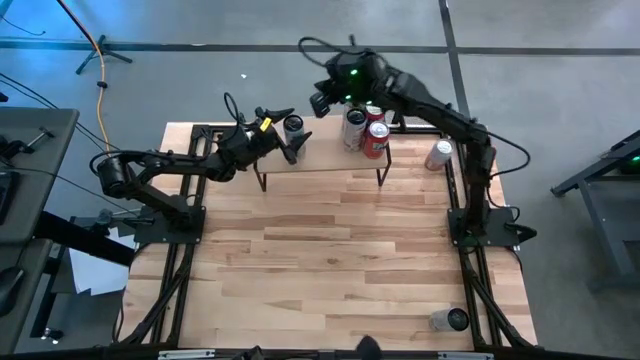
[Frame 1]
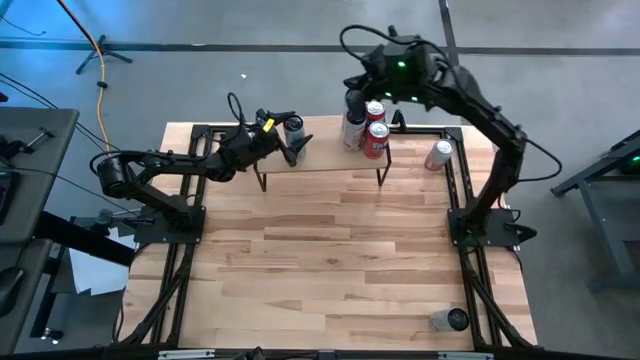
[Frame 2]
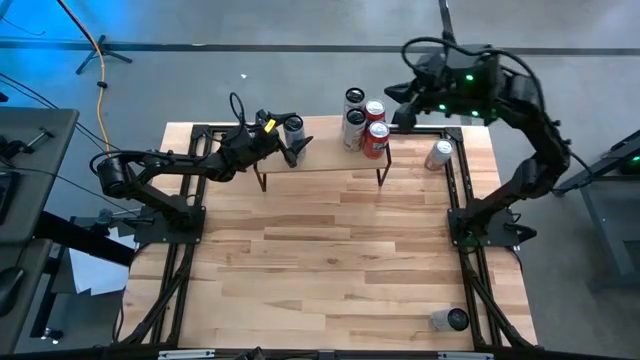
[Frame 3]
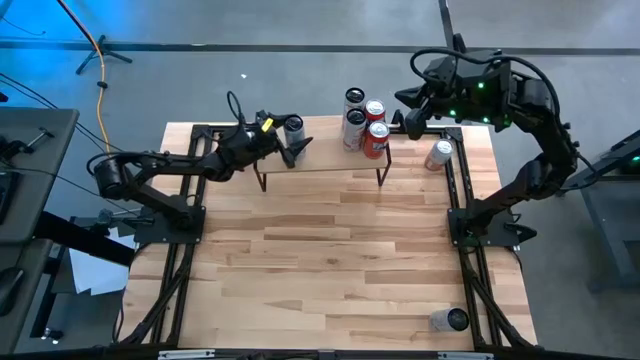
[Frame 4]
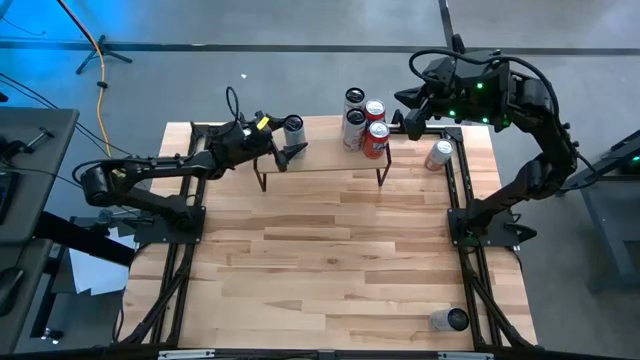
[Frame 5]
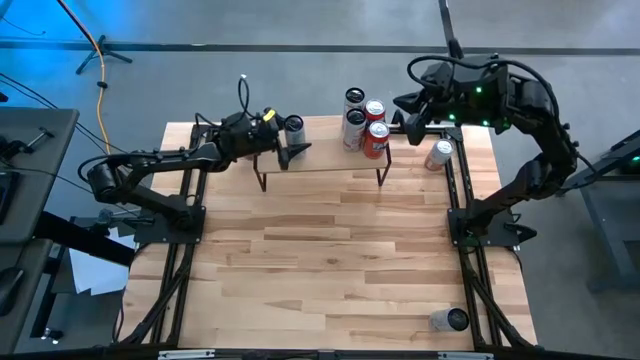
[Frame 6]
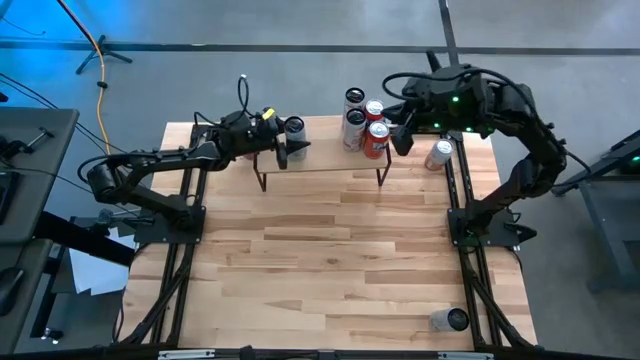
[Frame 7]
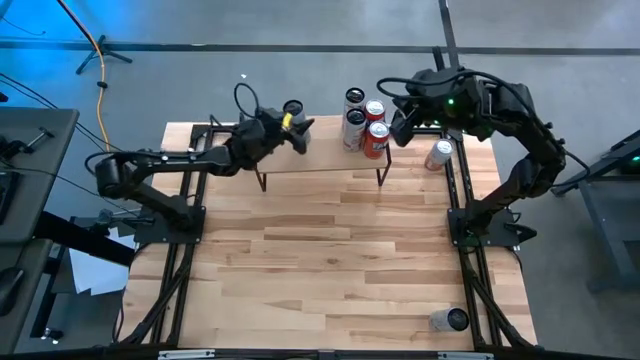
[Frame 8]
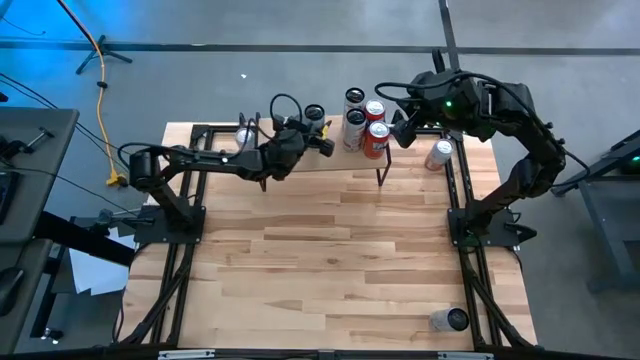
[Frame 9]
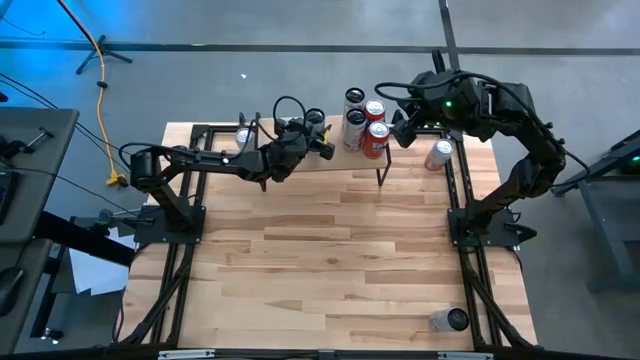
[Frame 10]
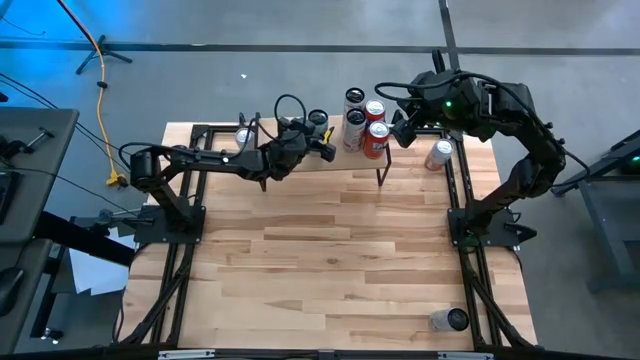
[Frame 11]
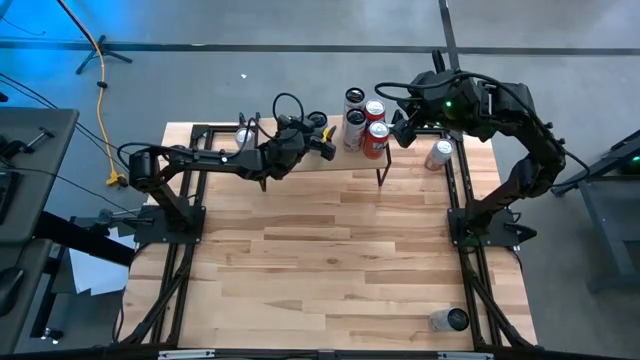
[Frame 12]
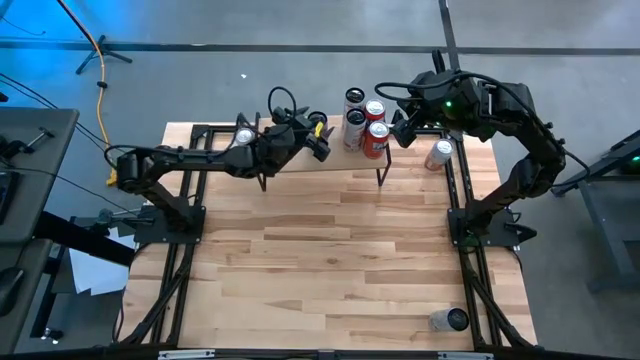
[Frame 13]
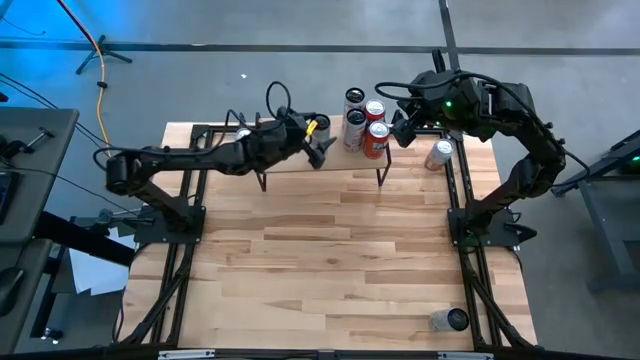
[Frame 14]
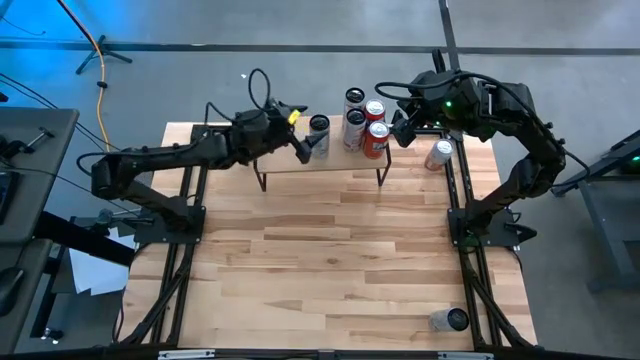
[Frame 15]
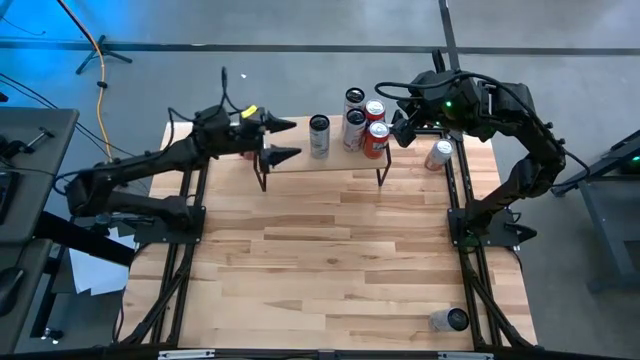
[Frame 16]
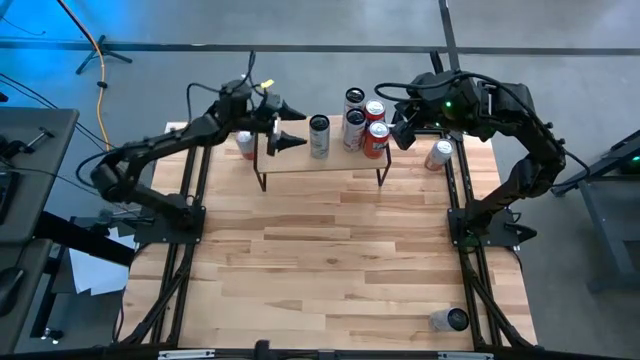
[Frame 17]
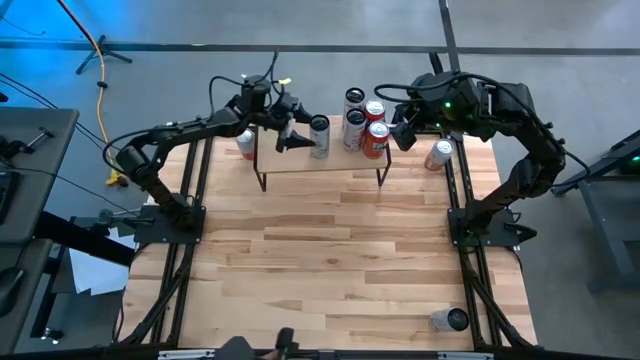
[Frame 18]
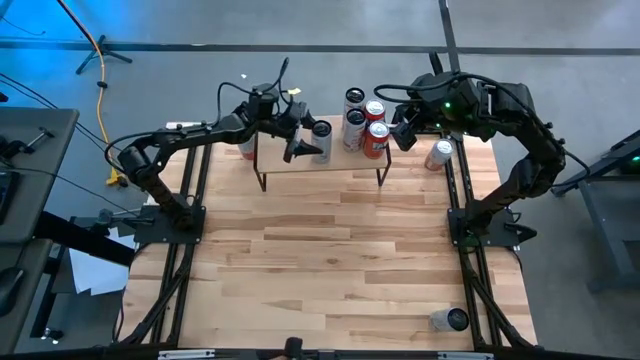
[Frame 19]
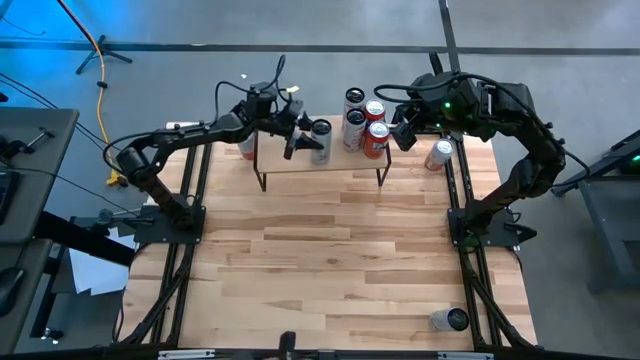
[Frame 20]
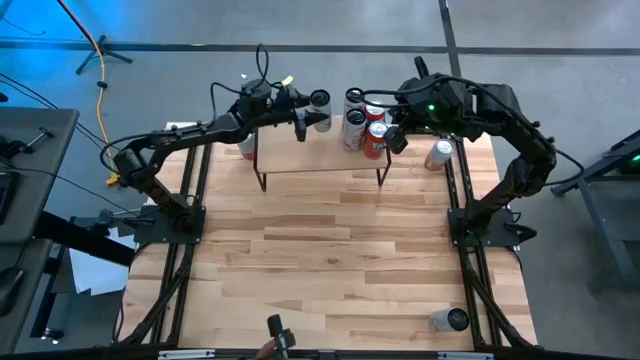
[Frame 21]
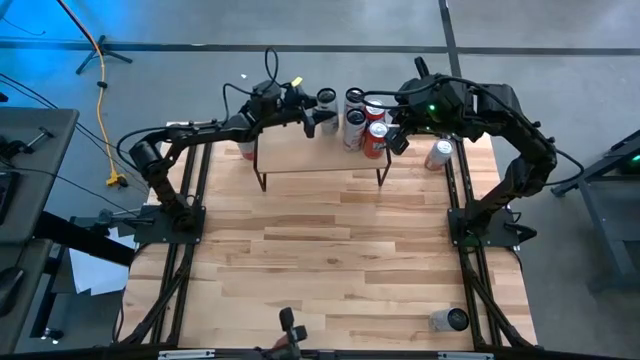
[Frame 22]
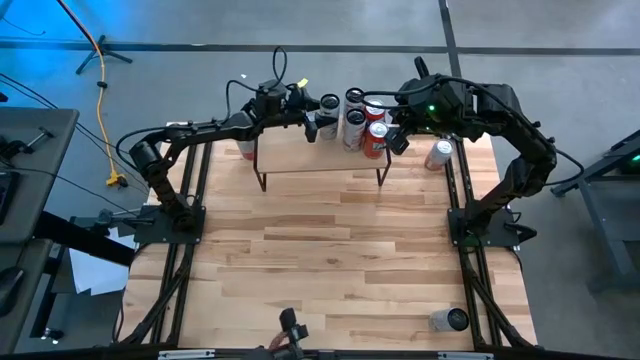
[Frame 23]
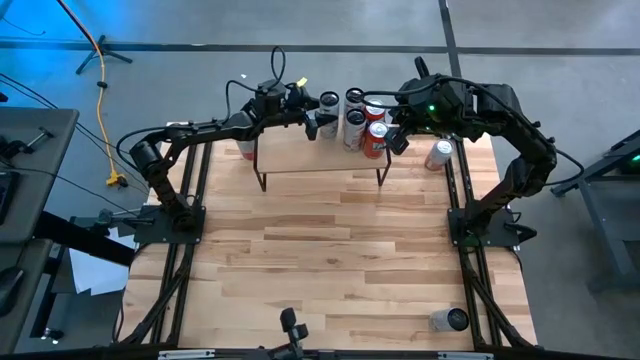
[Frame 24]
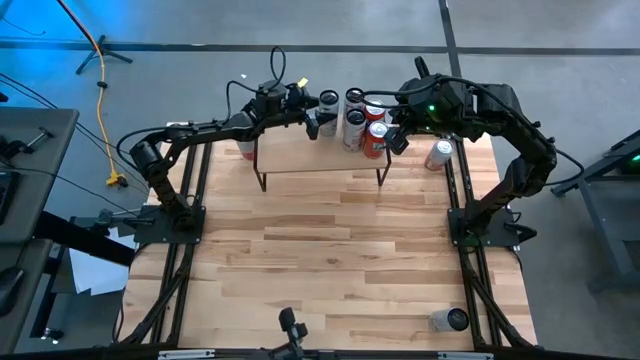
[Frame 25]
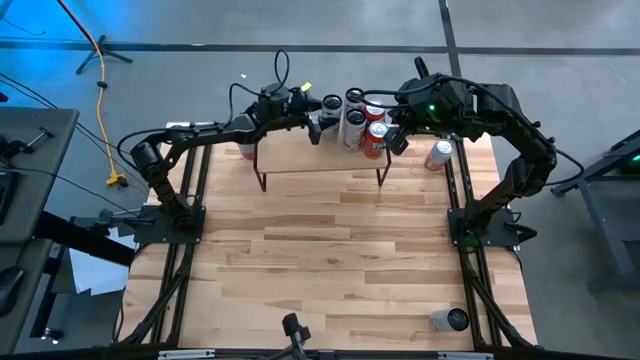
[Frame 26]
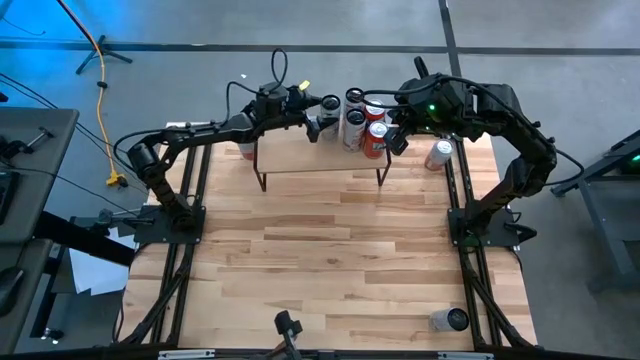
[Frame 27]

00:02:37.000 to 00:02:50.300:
Task: Place canned beverage on shelf
Put the top black blue soda can on the shelf

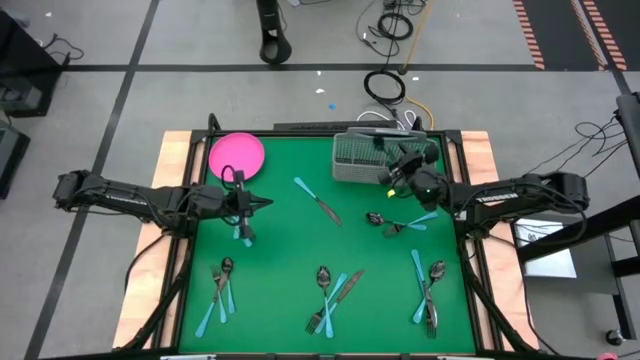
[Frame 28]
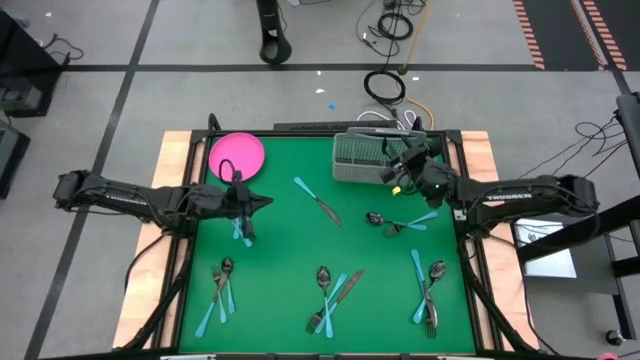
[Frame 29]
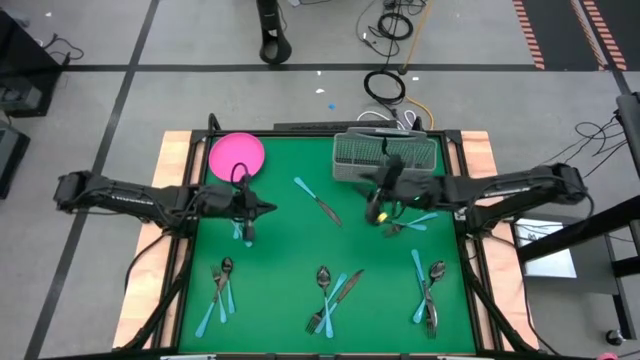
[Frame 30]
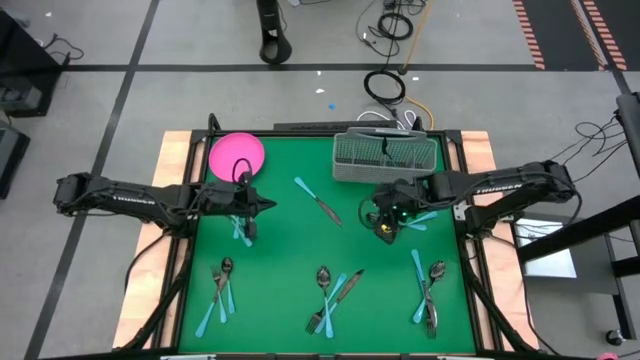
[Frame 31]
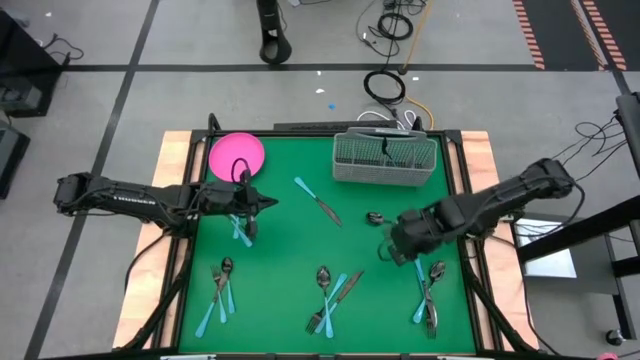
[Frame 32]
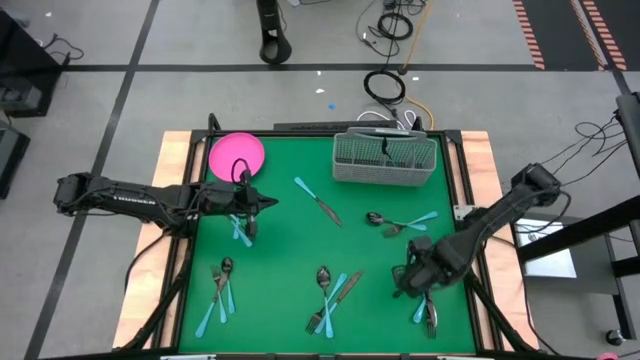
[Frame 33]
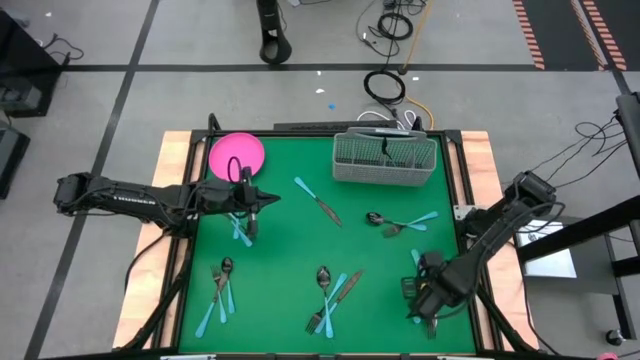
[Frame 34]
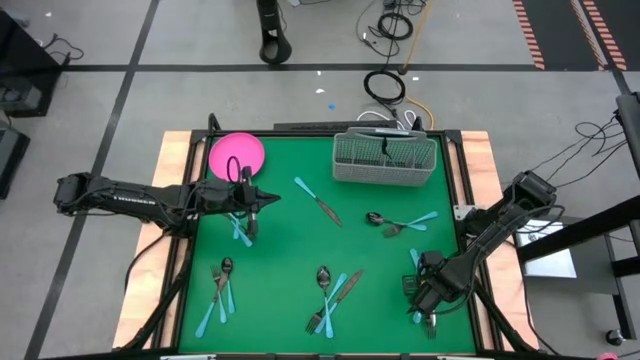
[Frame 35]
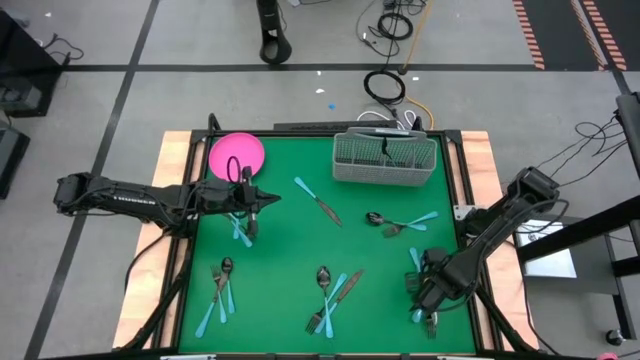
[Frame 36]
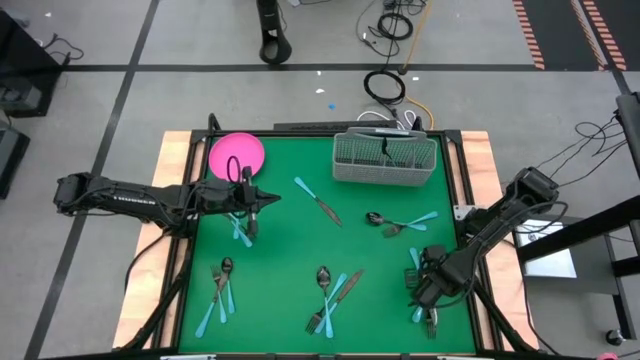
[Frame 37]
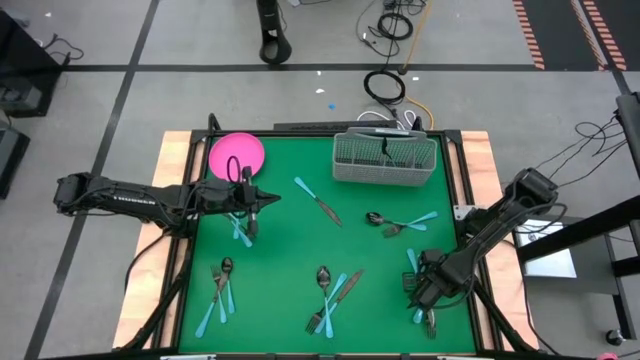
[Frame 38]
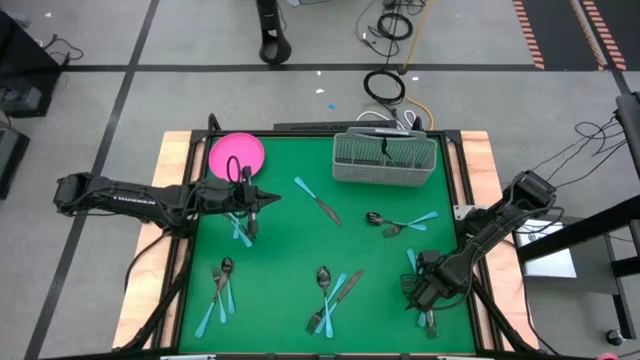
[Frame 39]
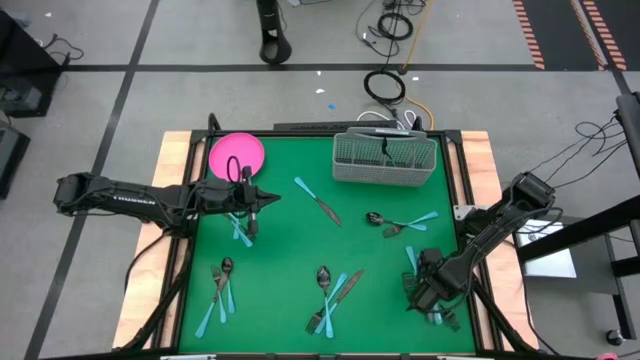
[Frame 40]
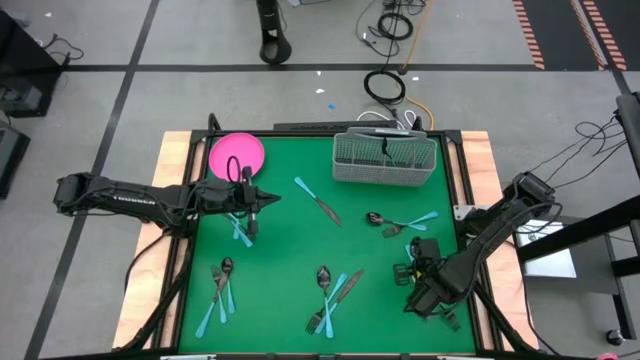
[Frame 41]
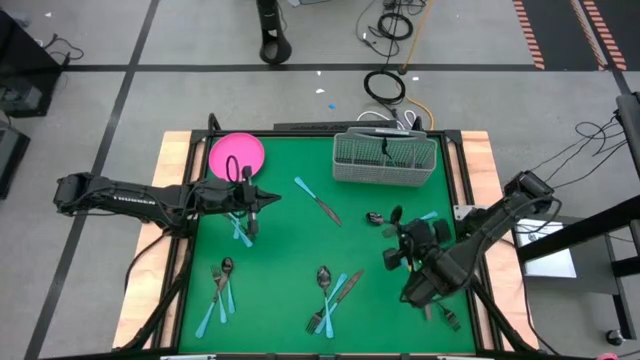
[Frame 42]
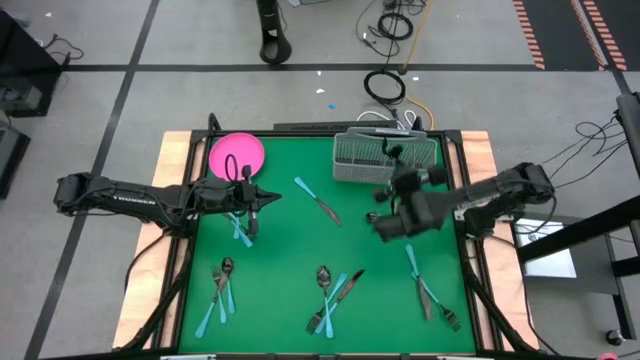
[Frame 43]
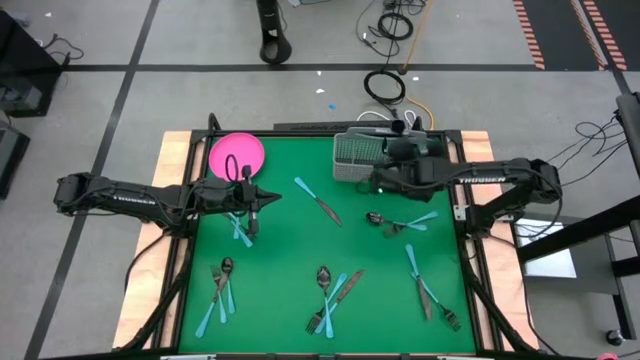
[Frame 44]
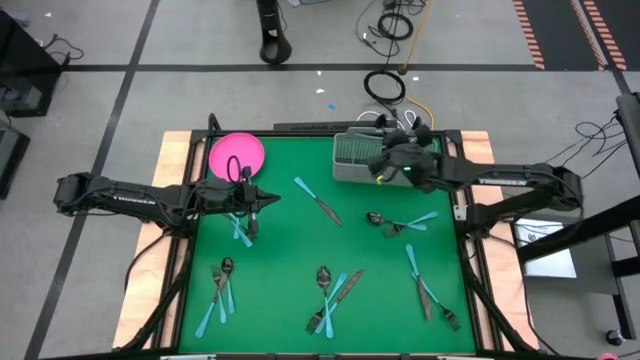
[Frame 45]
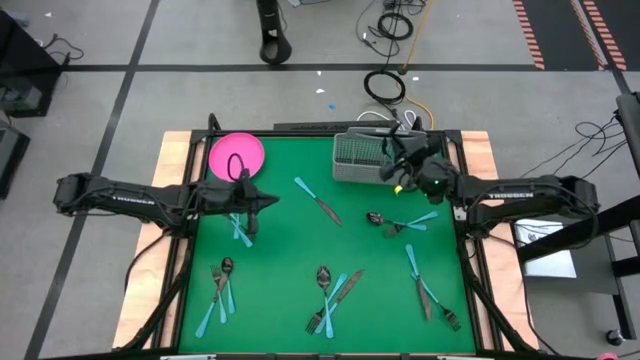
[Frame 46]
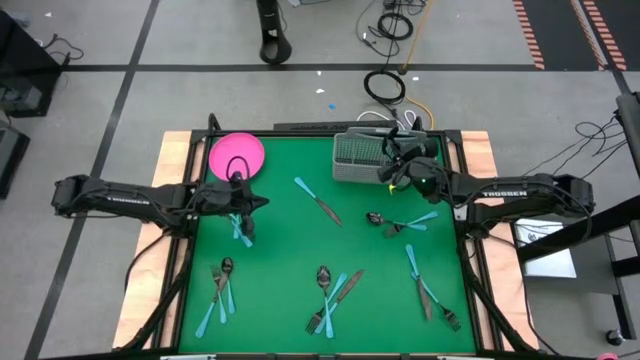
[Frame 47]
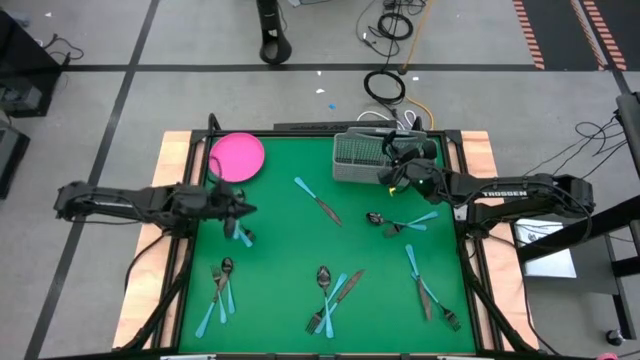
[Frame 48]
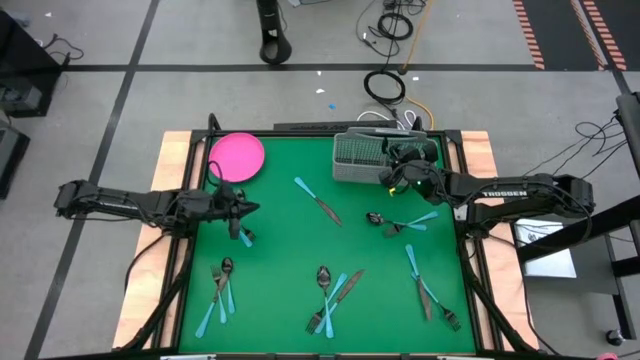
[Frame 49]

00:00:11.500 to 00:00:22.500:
Task: Sort silverware
Put the bottom right black spoon into the cutlery rack with the other black spoon
